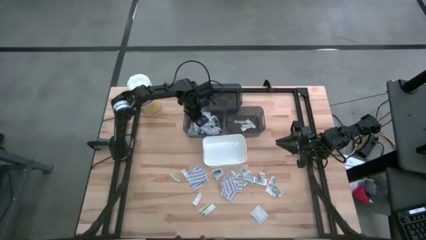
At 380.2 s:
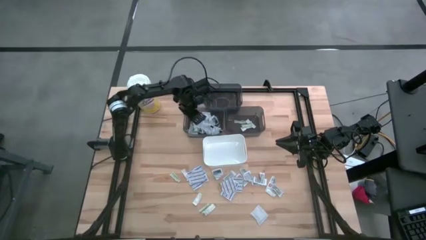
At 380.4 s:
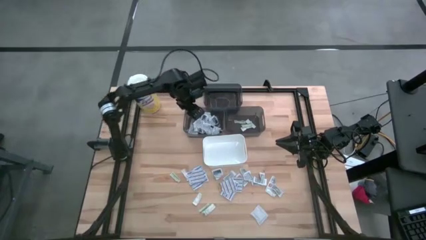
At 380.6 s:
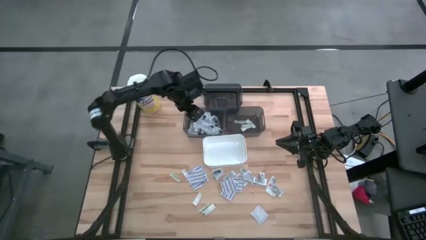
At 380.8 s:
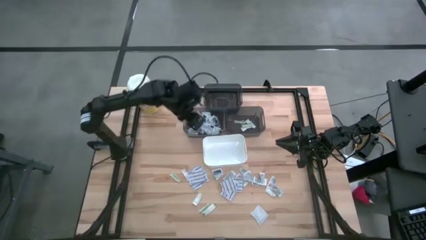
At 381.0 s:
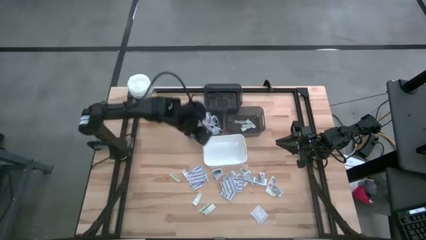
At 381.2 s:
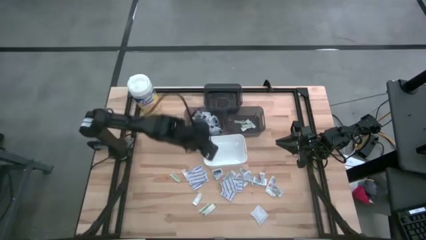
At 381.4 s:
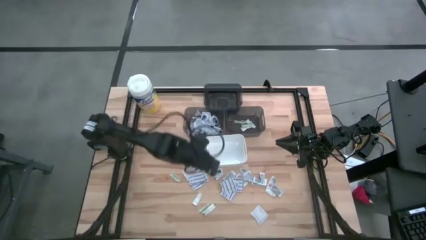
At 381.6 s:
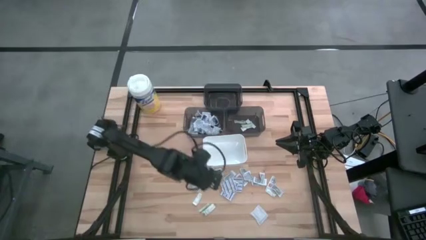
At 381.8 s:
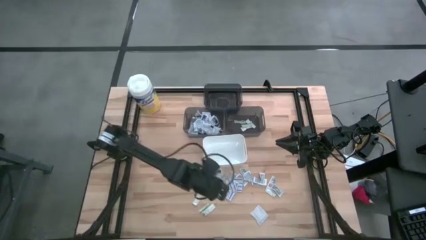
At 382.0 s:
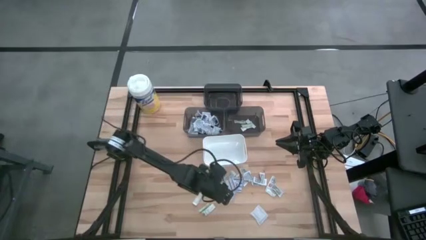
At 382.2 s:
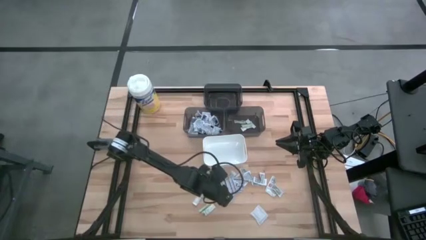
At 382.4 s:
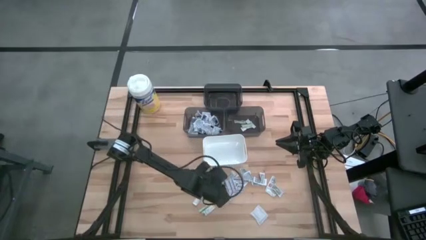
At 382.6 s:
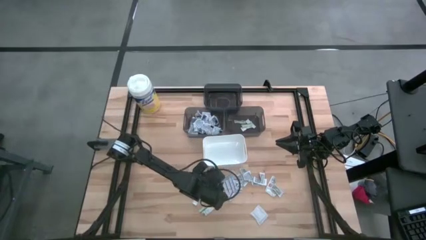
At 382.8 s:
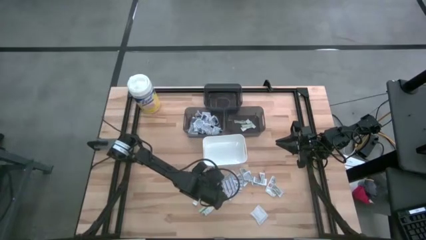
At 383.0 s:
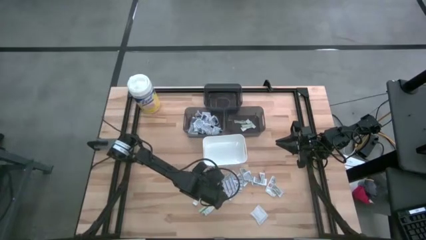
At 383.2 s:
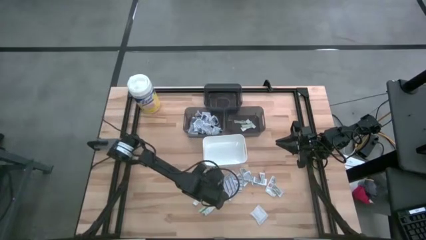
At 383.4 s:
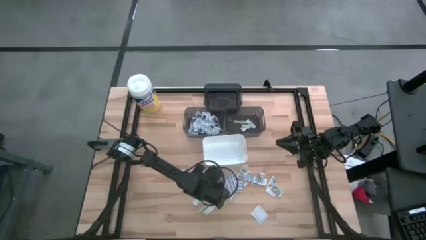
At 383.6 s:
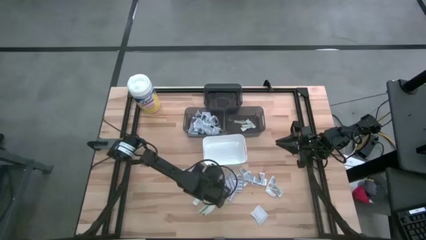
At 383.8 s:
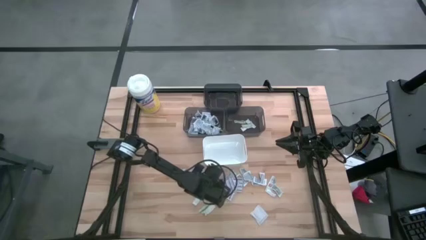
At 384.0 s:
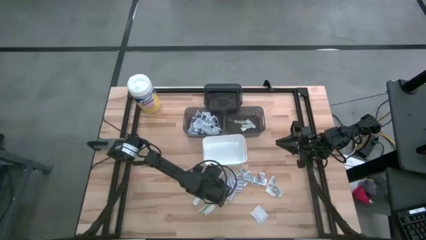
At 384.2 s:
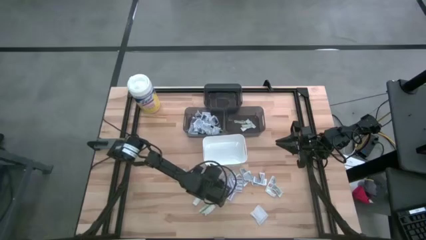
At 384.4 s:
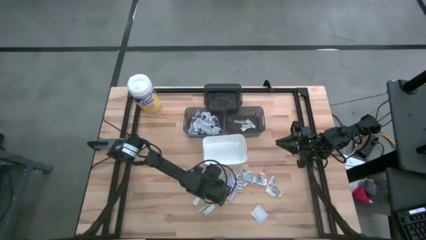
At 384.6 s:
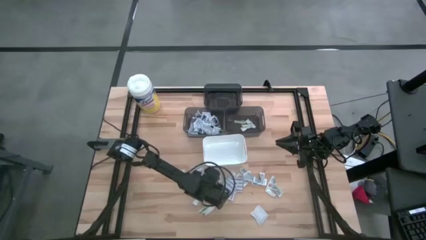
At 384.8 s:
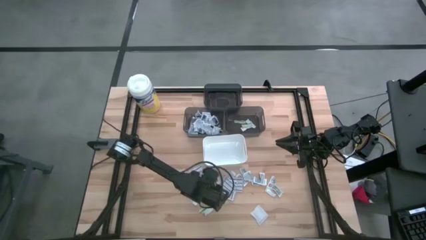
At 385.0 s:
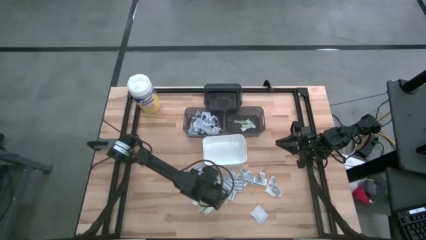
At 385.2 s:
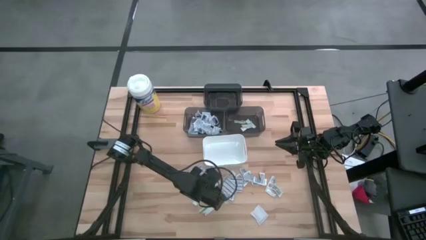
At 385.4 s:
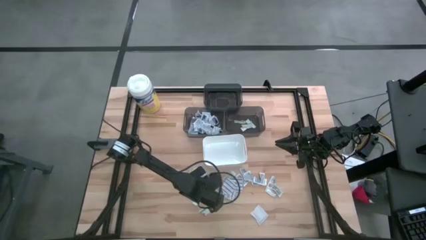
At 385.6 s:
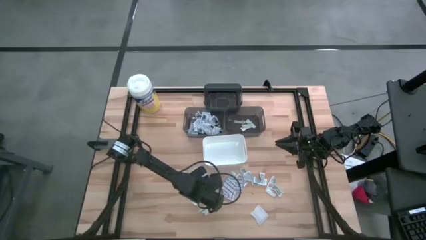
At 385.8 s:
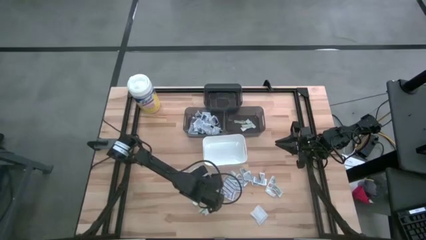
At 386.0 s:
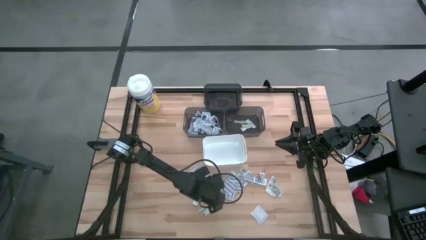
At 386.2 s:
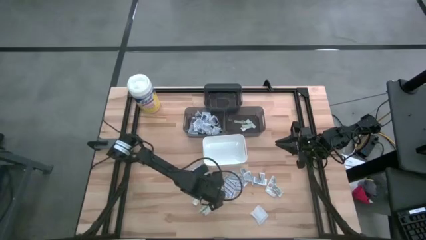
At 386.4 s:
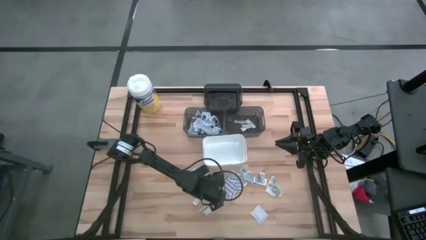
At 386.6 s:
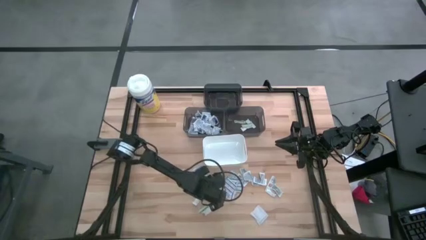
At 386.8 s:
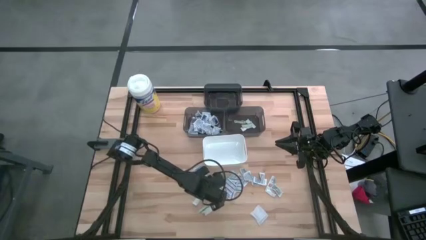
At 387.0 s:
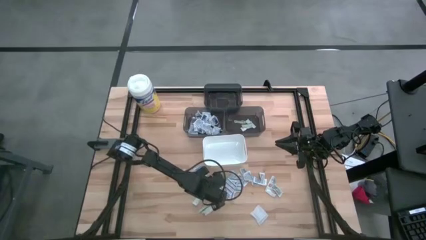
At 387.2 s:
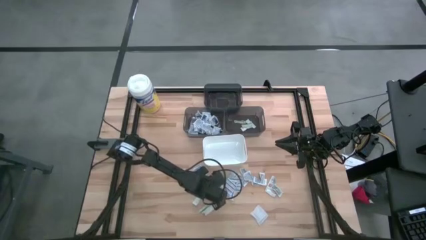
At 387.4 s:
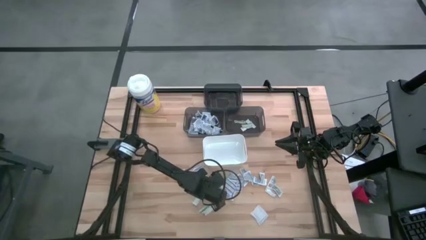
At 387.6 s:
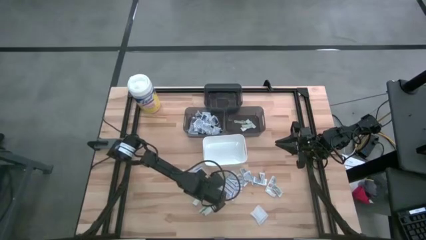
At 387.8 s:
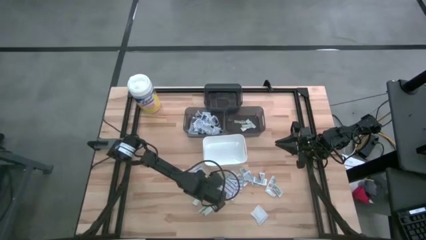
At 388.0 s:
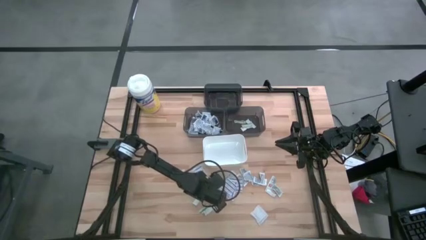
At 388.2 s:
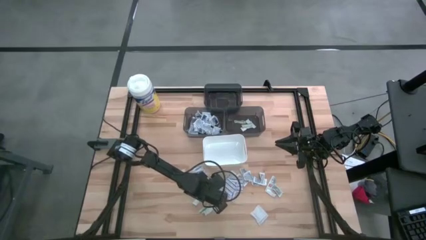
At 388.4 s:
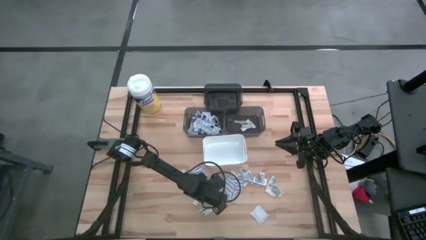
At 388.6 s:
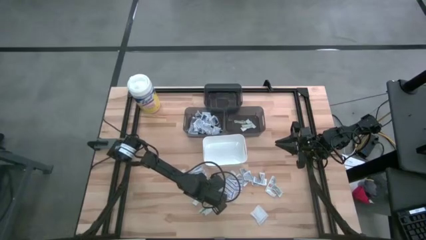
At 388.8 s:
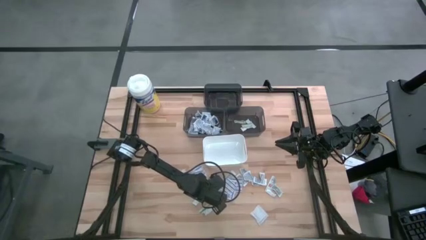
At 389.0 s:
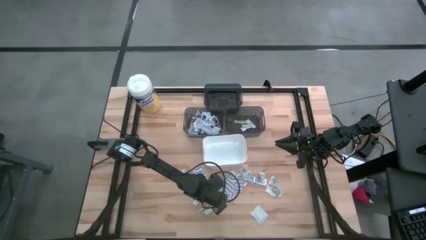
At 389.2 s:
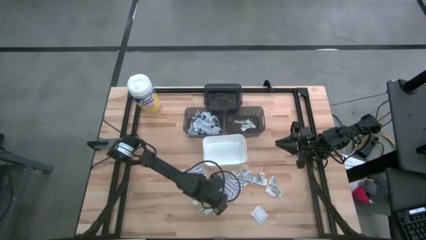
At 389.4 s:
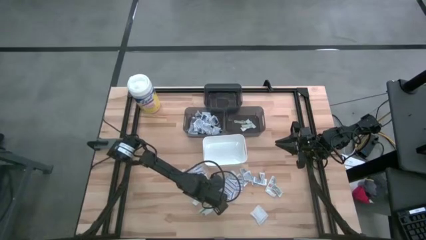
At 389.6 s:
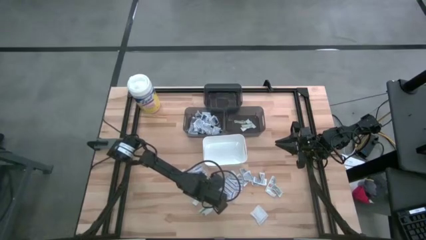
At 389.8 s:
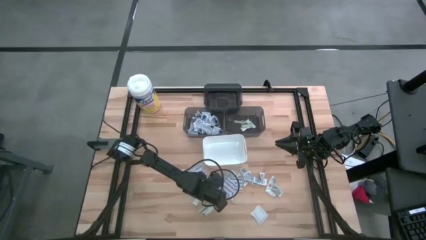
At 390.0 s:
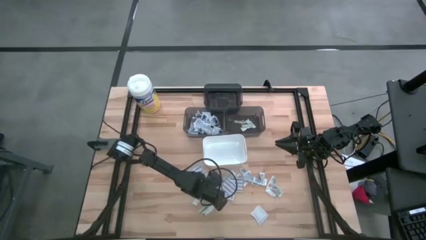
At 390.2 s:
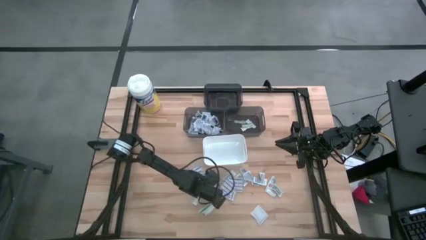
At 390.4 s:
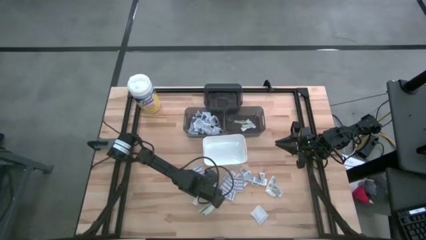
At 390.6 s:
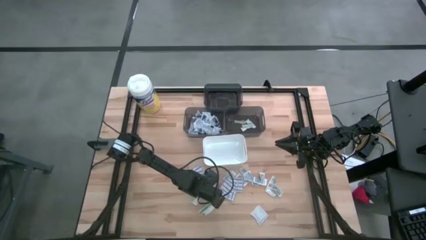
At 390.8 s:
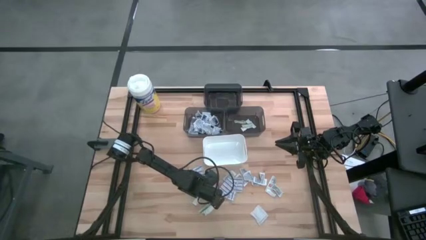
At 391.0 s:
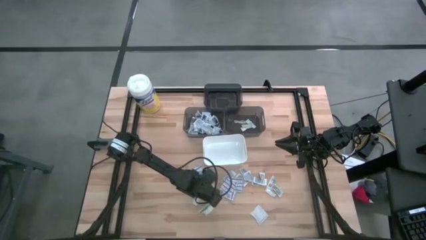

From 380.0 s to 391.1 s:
Task: Pick & Place First Aid Supplies
Put the alcohol pad into the bottom left black bin

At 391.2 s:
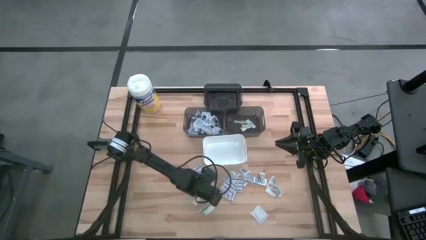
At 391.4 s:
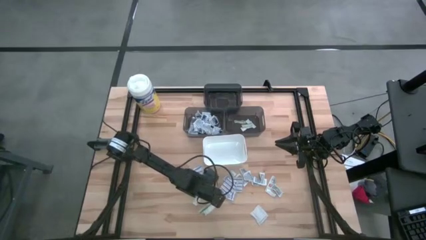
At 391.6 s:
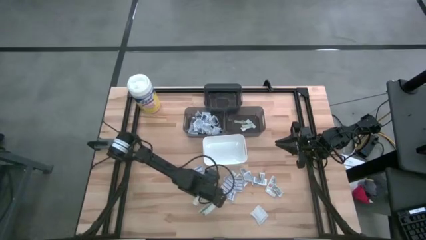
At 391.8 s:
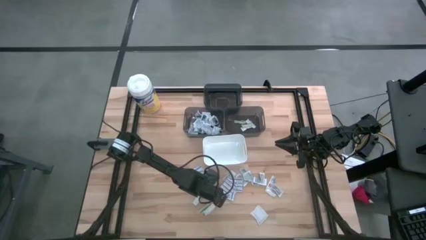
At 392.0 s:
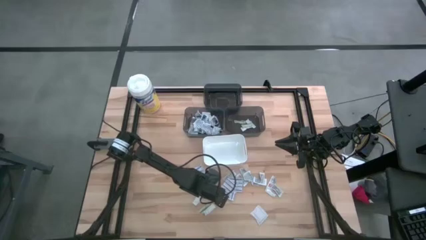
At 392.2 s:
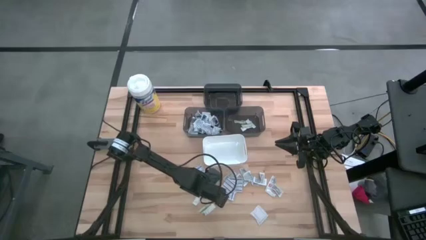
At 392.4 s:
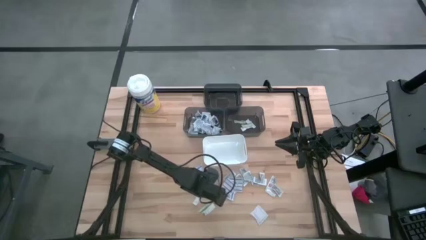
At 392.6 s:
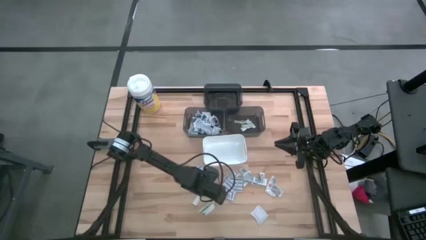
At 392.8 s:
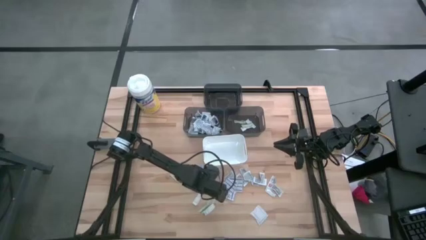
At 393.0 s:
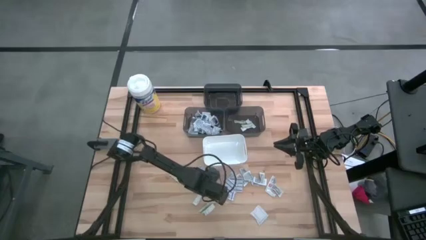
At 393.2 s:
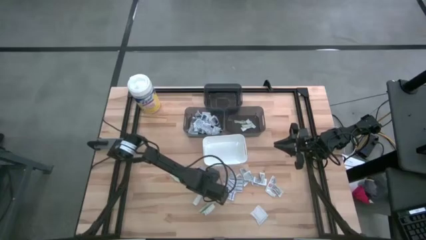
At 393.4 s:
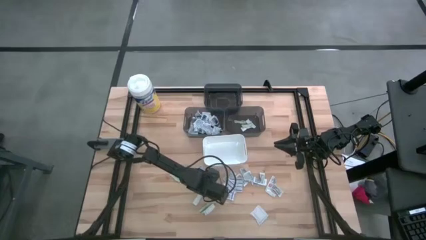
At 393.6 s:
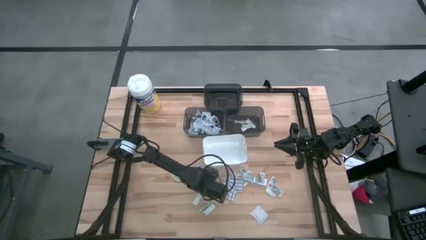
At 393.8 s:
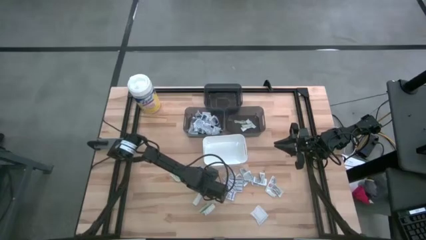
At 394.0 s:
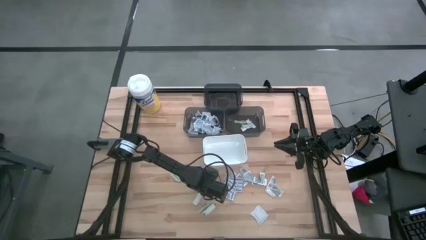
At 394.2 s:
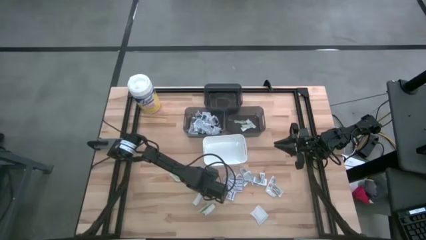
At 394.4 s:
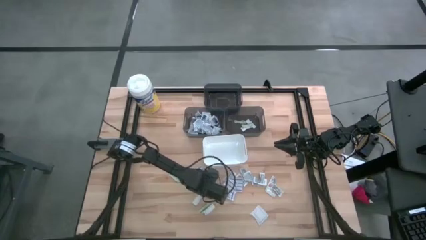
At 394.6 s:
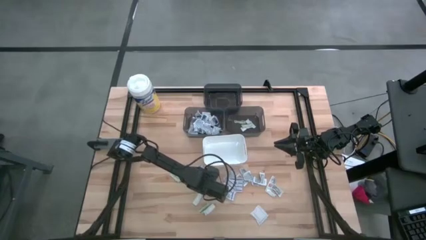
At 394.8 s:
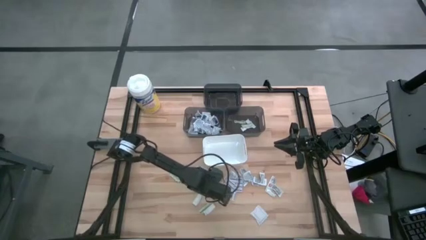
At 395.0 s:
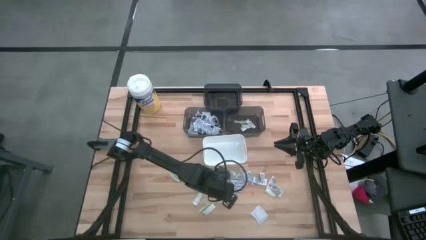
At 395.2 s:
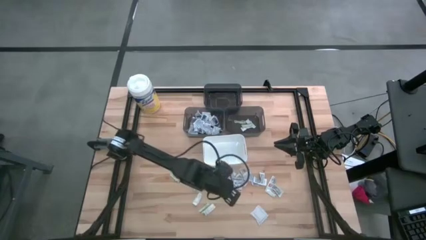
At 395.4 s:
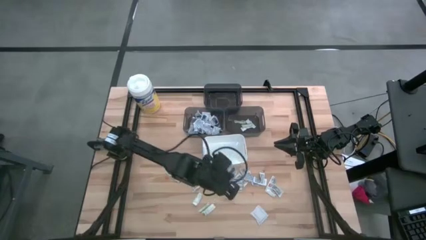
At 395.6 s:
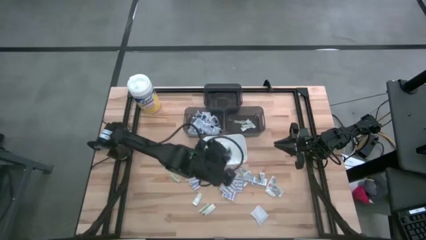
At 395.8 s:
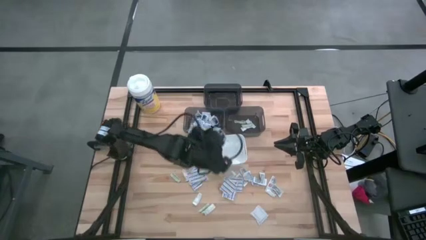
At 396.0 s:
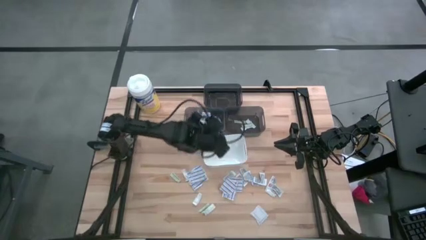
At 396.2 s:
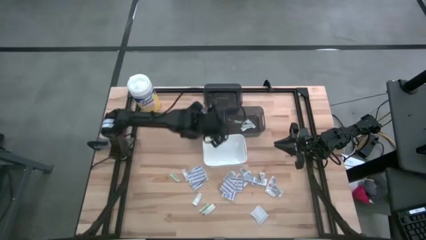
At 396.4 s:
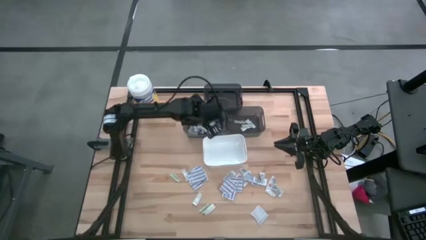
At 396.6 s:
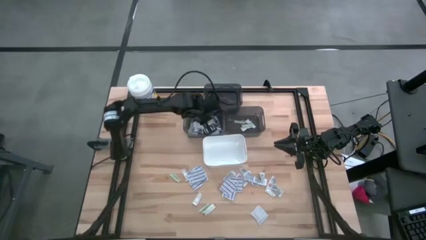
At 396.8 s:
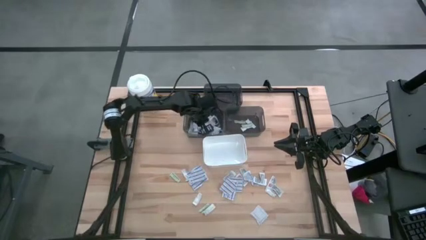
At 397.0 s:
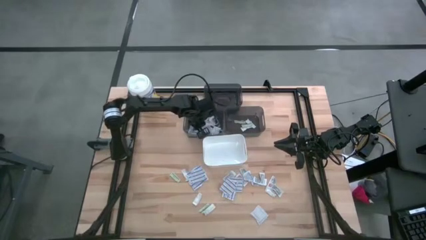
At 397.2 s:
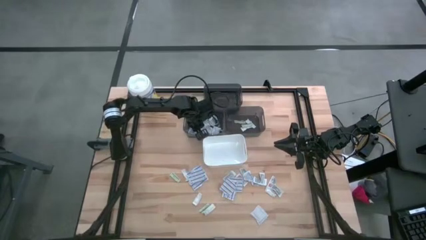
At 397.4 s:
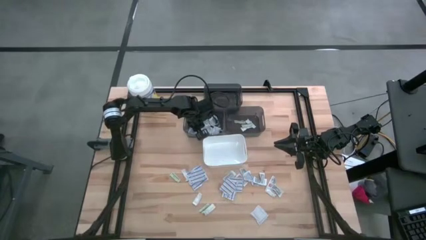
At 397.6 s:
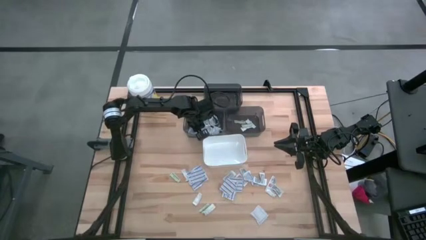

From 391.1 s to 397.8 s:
Put the alcohol pad into the bottom left black bin
